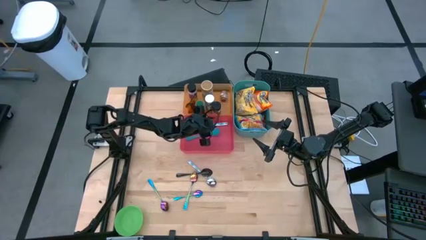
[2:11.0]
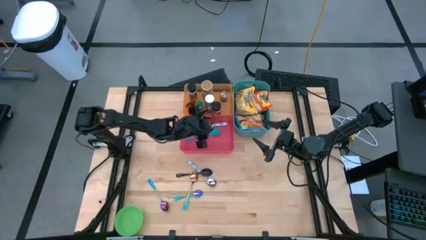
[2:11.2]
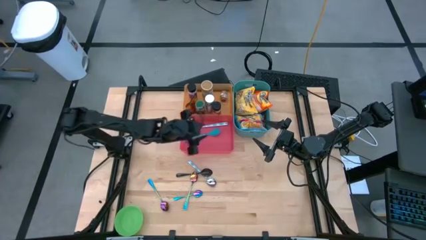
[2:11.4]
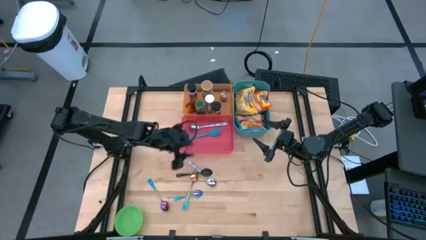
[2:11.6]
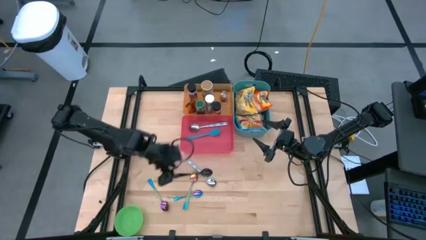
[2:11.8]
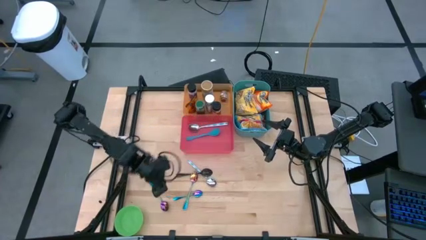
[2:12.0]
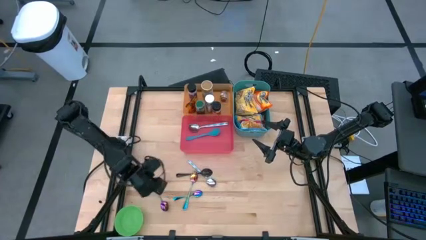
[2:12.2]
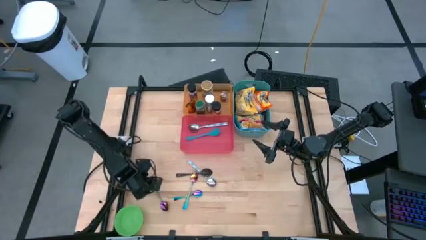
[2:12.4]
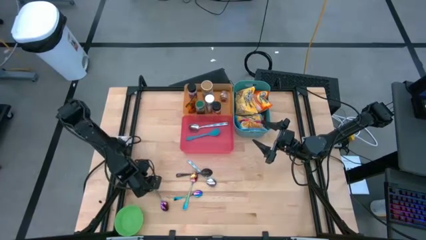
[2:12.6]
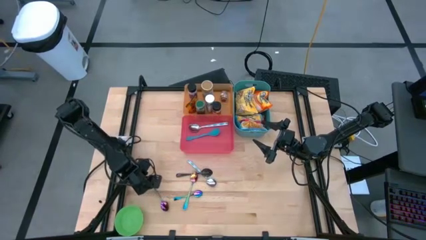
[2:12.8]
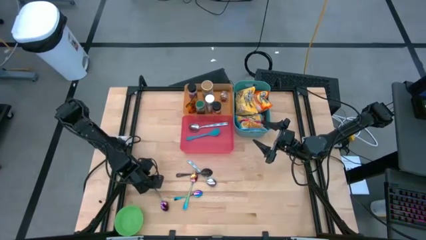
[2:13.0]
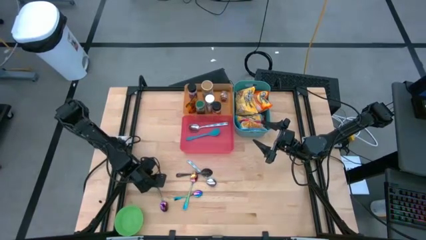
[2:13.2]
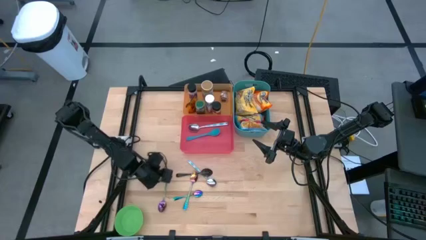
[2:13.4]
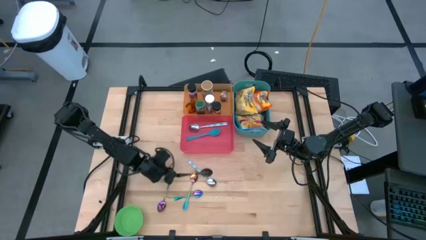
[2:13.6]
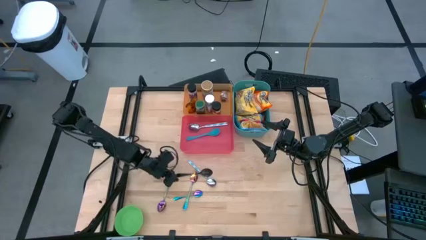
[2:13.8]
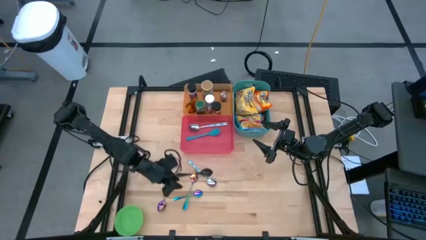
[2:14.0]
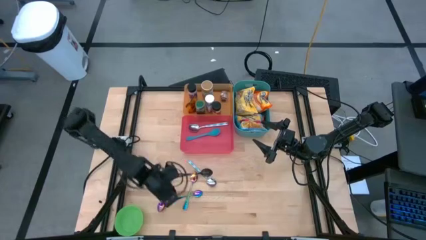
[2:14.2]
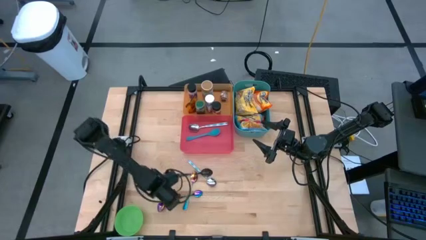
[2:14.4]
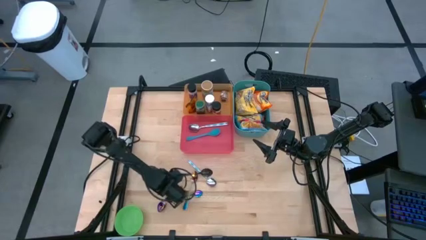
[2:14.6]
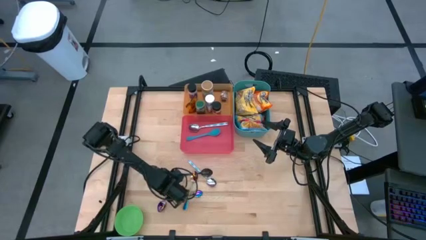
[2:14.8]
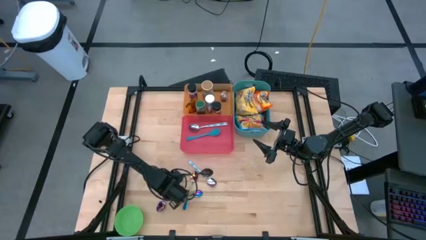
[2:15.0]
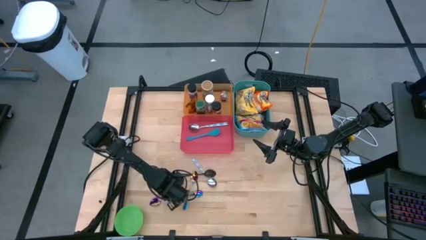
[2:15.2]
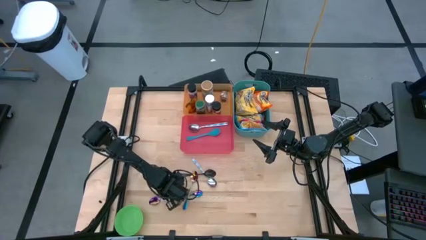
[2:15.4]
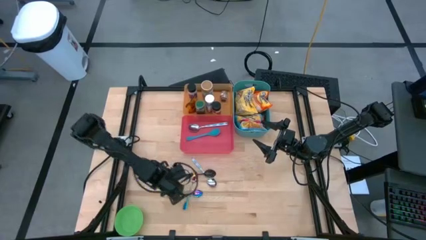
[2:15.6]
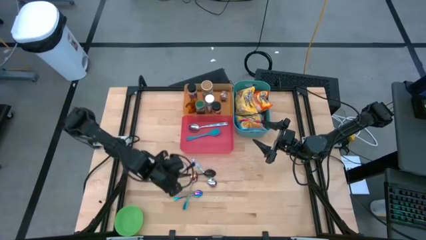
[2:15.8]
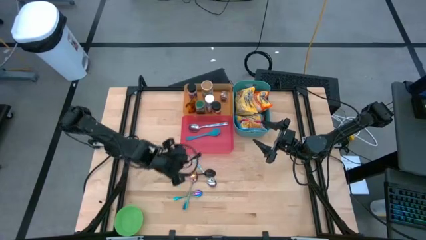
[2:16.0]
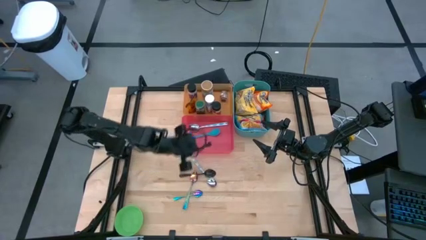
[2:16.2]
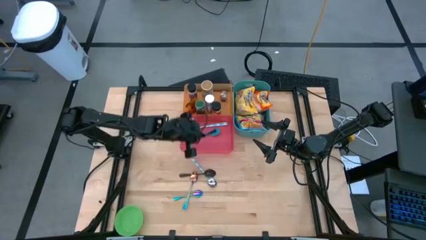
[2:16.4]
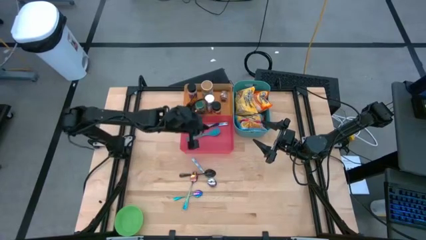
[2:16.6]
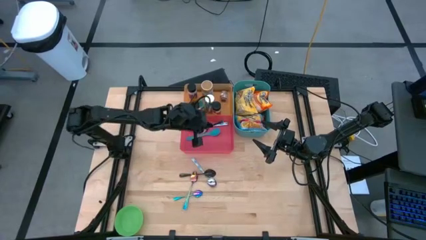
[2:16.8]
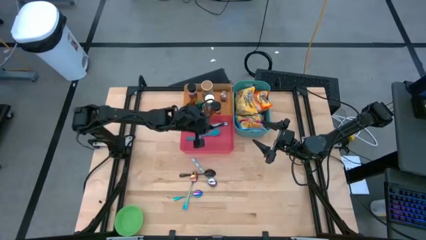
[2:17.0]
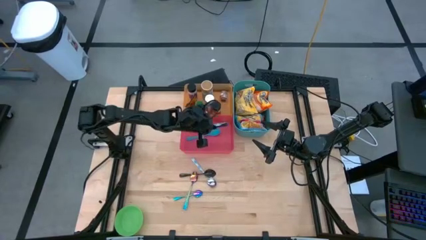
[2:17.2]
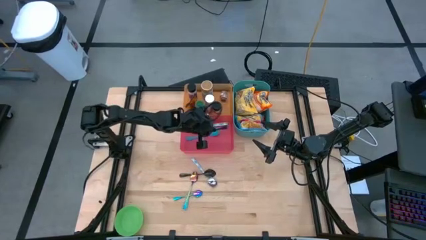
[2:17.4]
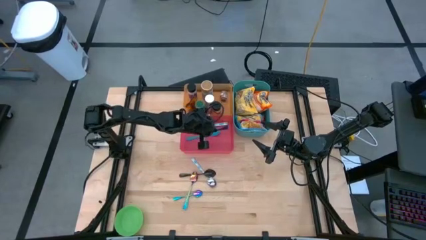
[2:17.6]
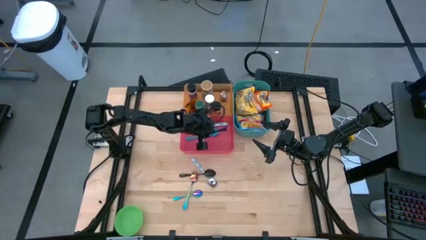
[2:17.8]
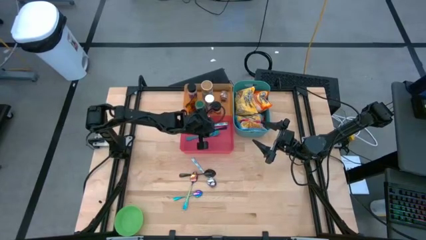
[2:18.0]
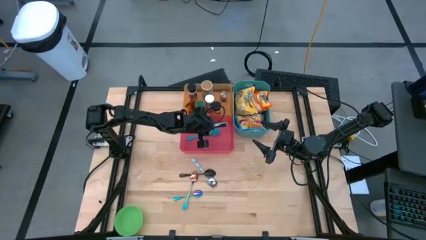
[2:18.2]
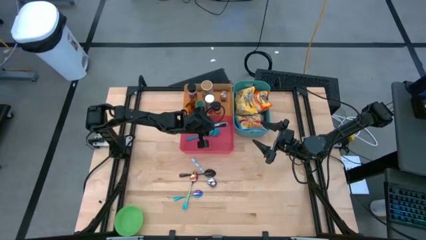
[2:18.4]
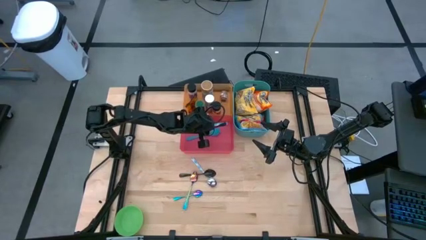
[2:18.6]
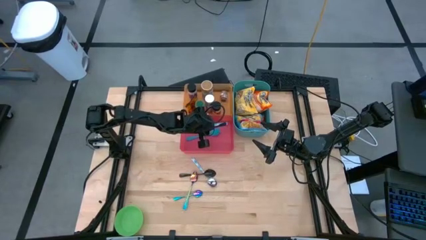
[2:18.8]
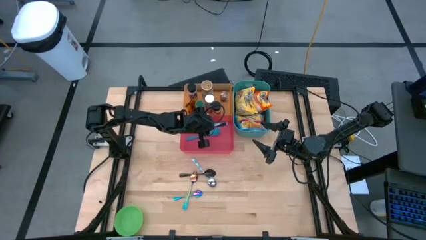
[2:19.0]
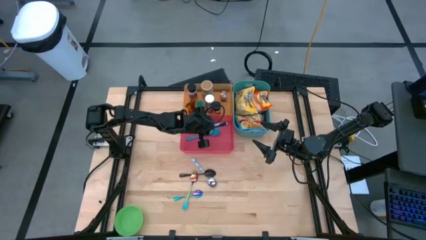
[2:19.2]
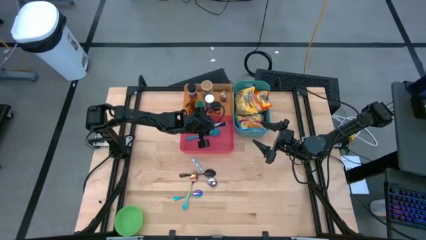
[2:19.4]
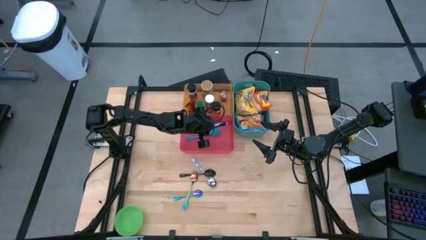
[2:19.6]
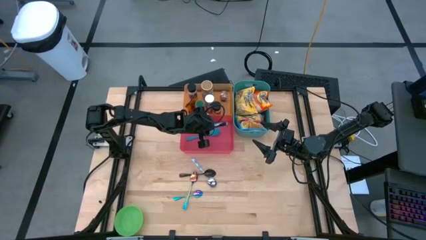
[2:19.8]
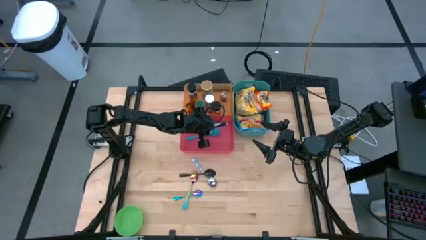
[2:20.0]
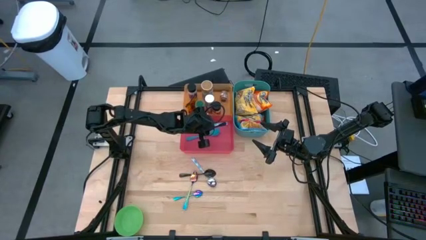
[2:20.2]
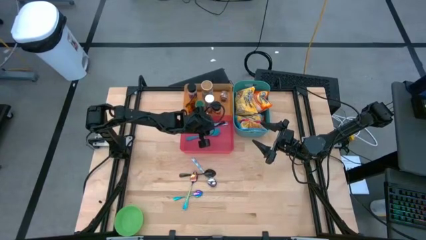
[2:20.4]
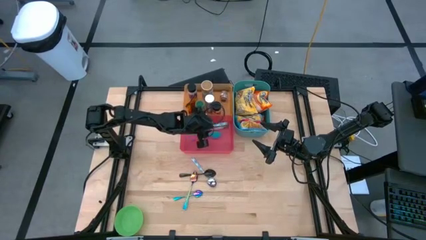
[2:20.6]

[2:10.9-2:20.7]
Task: Pick & Place Food Item
Put the bottom left blue spoon into the red bin

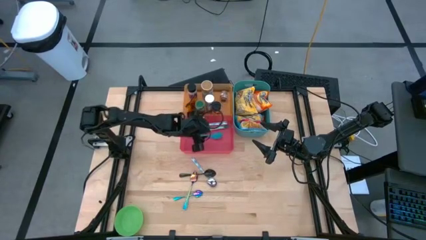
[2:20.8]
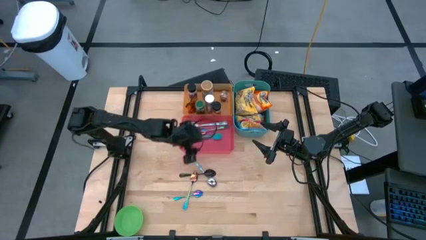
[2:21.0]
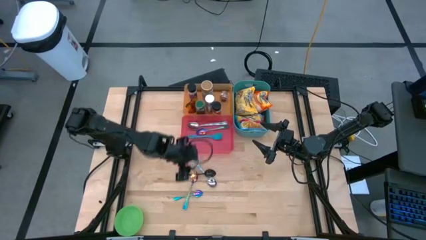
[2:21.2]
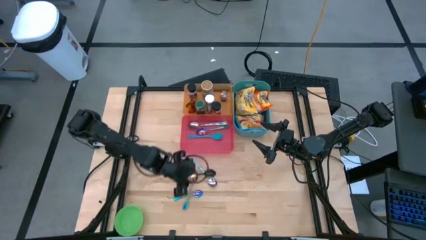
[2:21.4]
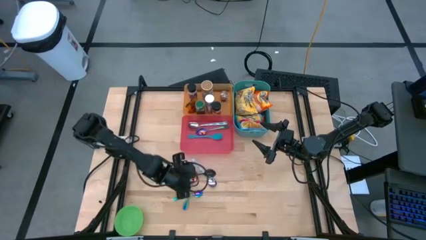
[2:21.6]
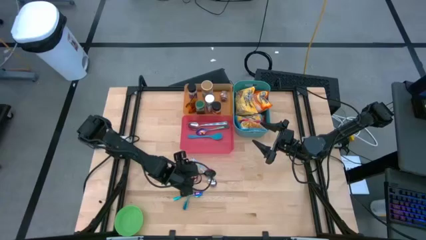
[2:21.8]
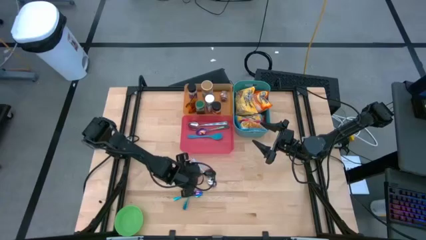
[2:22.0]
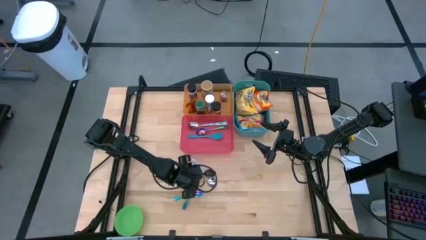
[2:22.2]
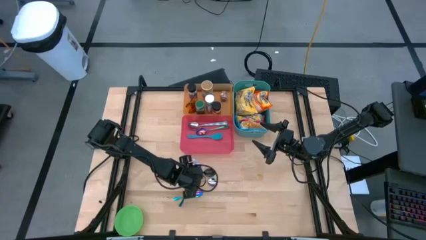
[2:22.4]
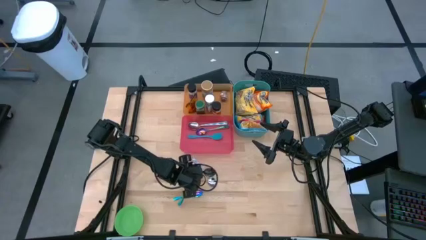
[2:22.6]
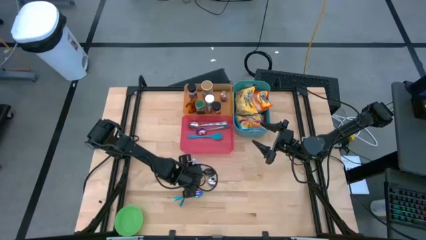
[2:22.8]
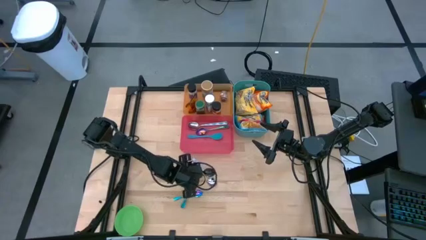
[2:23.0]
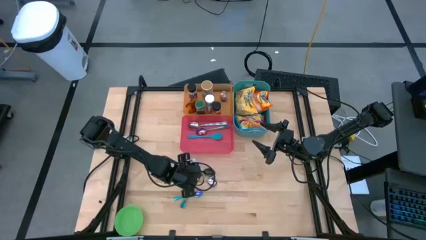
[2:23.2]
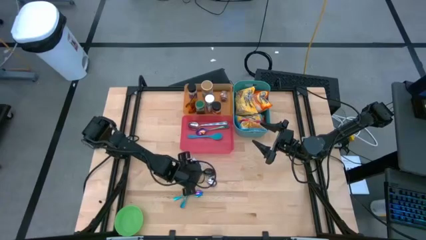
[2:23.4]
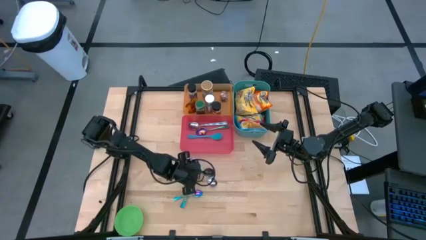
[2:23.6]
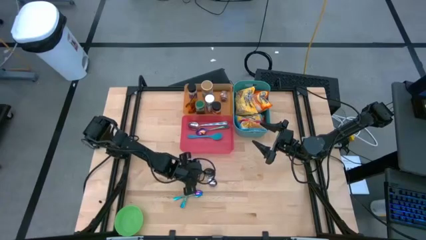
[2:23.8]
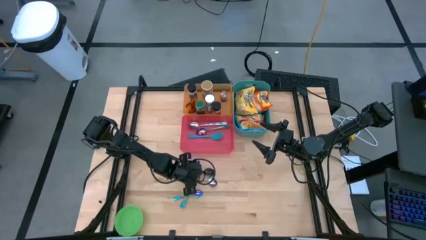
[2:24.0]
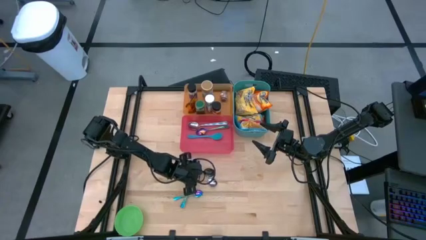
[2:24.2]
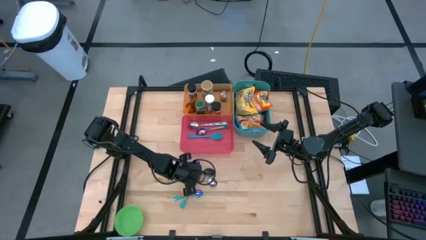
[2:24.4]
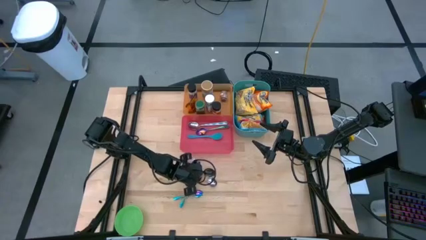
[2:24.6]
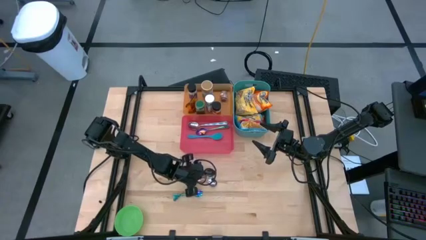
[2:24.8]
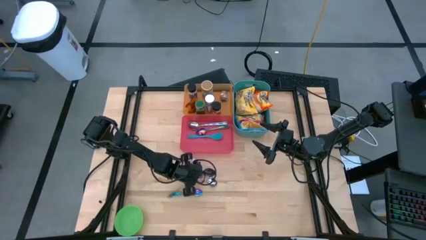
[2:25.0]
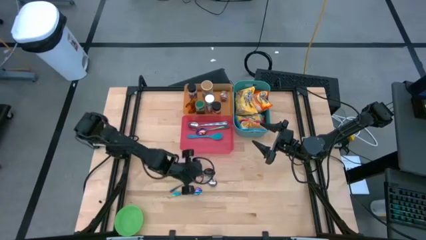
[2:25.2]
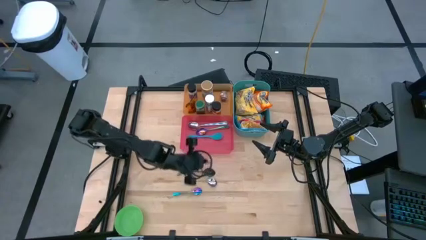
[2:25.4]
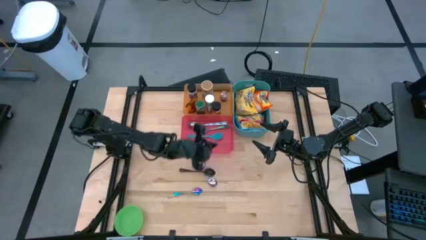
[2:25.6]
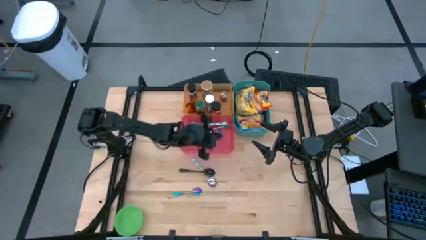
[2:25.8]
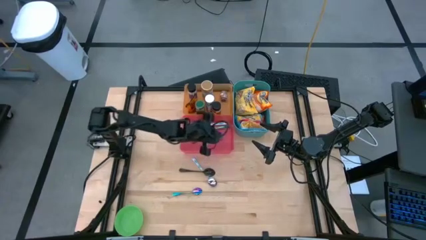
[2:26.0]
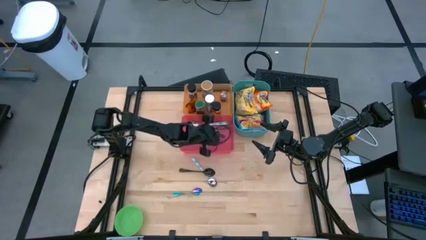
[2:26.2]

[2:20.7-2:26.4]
Put the top blue spoon into the red bin

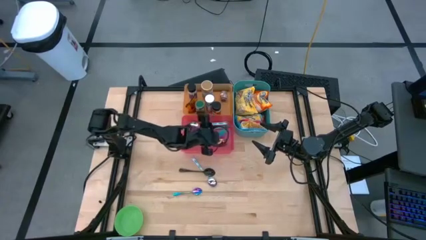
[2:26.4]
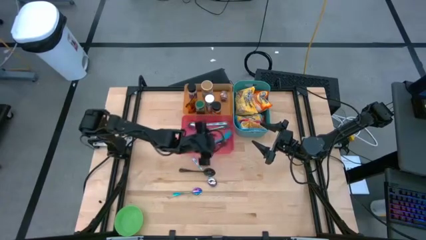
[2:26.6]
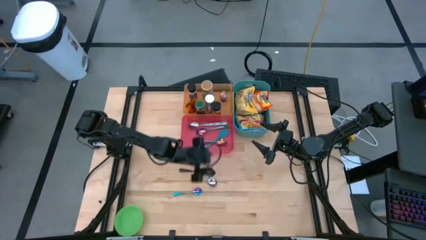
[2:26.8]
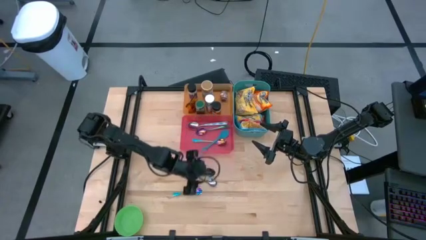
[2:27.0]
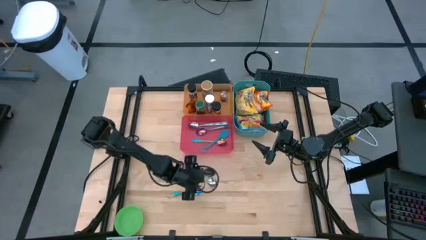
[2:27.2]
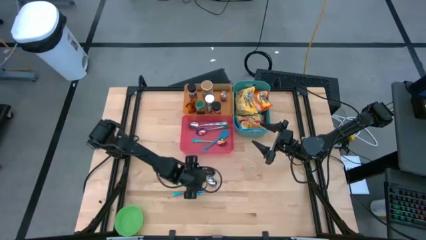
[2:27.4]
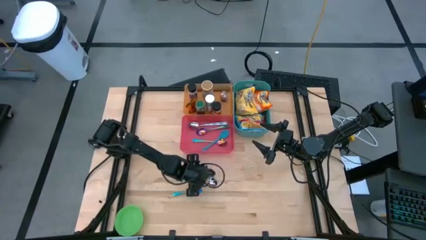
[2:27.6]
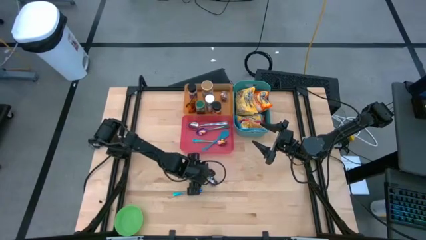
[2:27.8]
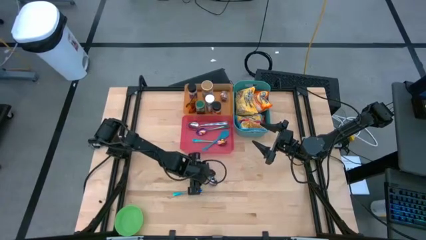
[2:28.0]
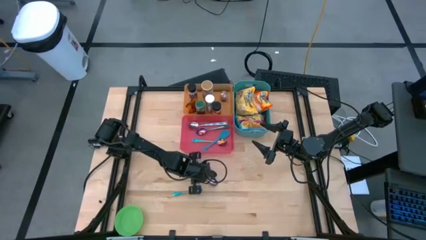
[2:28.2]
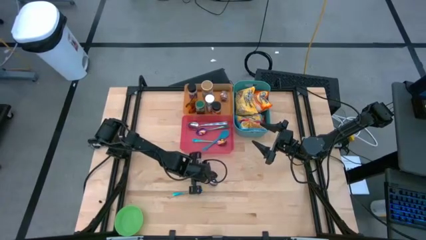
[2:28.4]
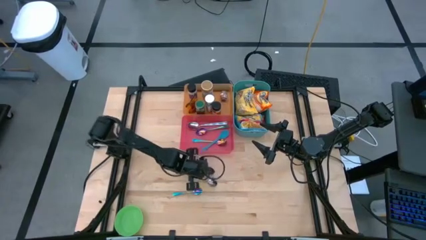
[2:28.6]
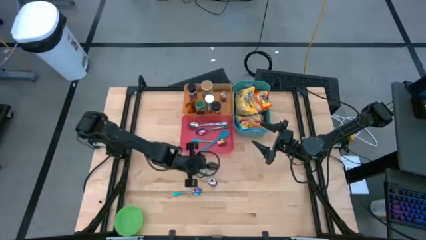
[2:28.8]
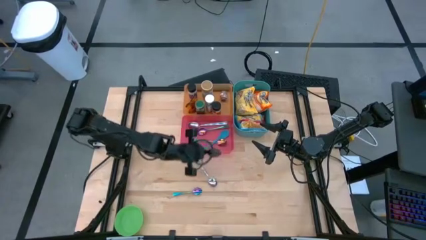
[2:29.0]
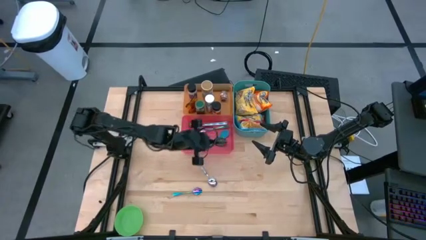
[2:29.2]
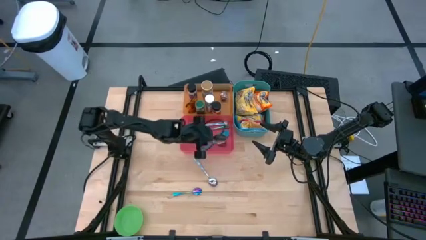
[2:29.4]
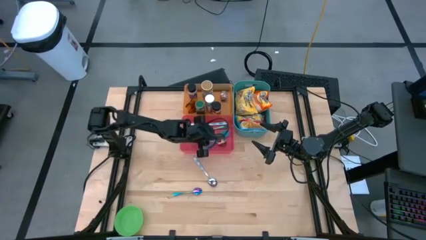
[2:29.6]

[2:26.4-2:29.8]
Put the black spoon into the red bin
